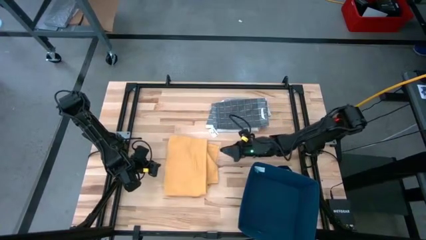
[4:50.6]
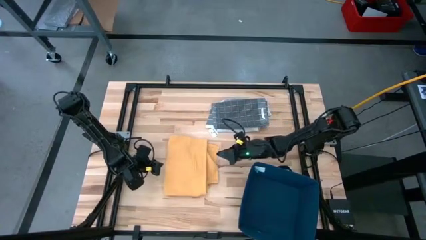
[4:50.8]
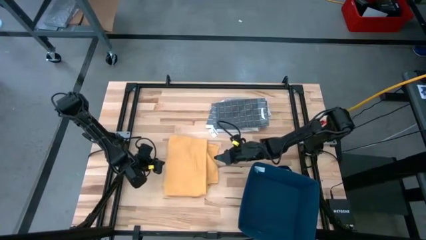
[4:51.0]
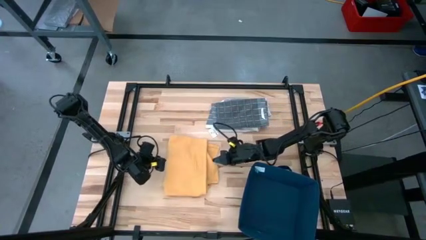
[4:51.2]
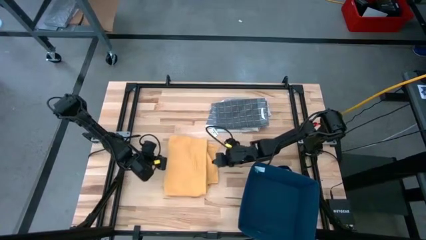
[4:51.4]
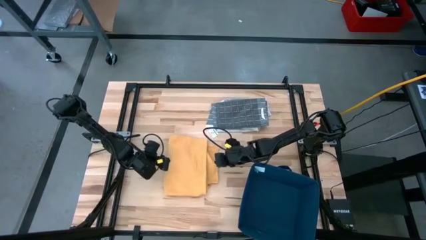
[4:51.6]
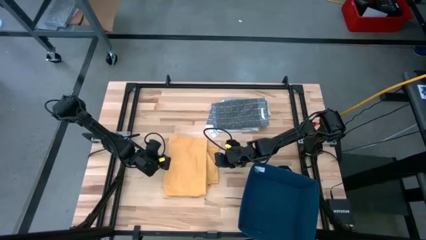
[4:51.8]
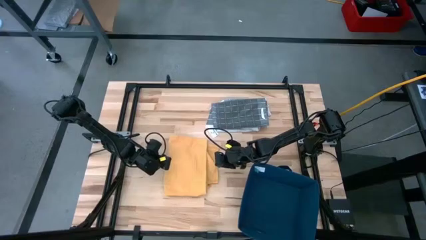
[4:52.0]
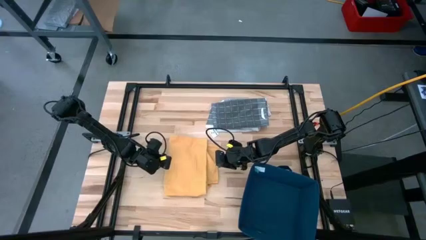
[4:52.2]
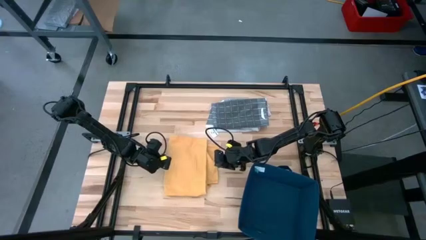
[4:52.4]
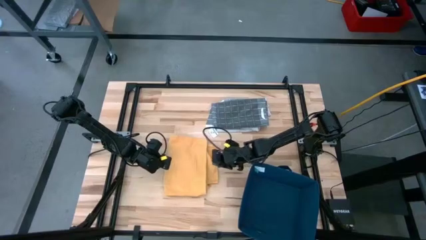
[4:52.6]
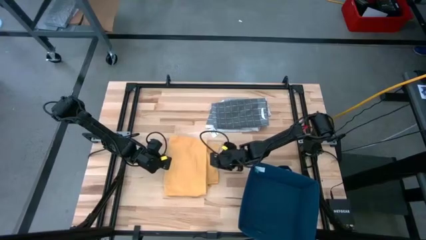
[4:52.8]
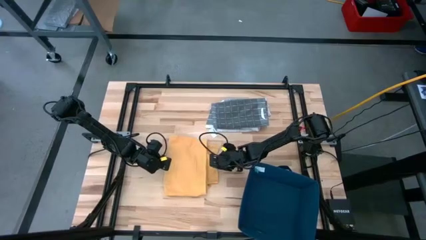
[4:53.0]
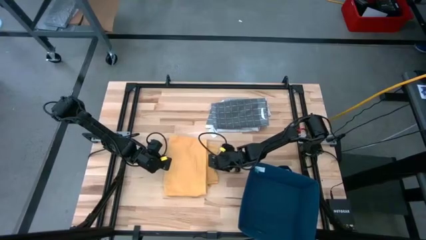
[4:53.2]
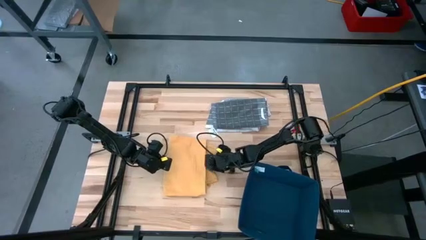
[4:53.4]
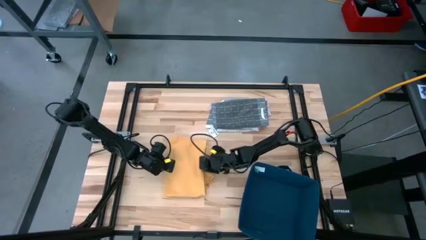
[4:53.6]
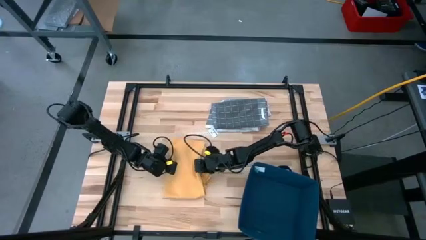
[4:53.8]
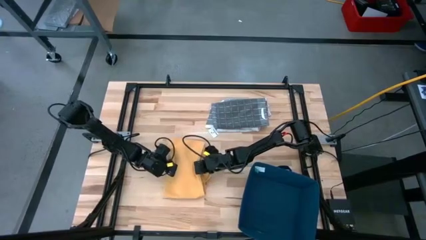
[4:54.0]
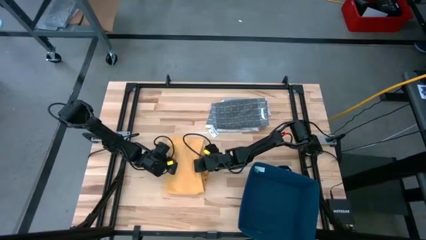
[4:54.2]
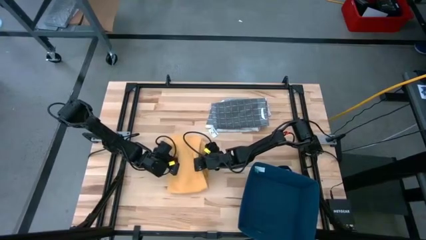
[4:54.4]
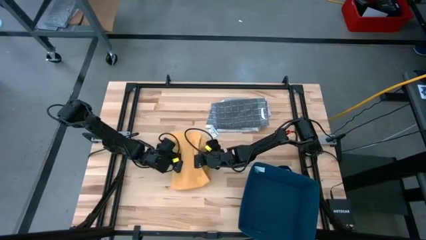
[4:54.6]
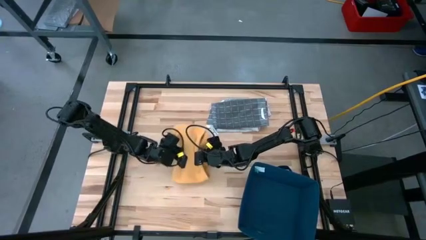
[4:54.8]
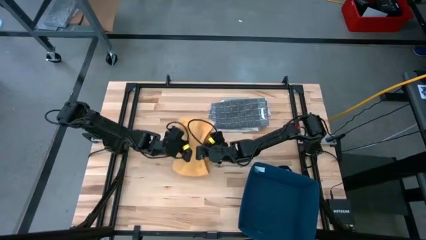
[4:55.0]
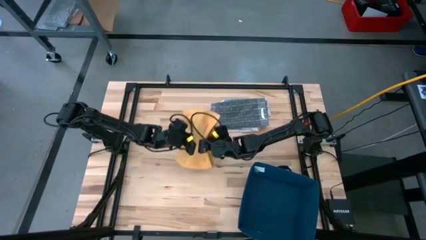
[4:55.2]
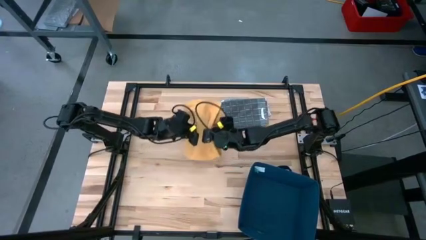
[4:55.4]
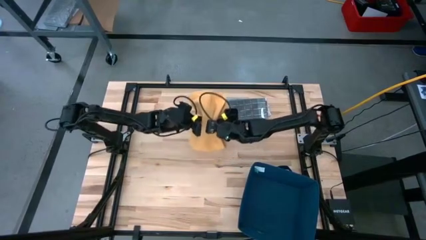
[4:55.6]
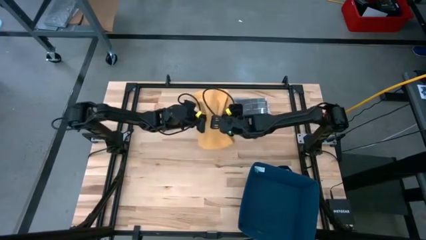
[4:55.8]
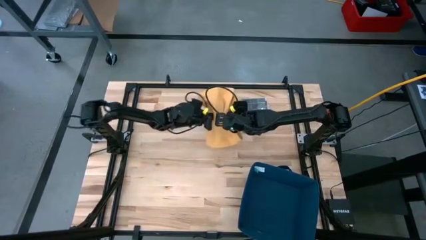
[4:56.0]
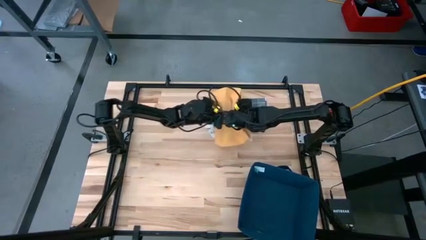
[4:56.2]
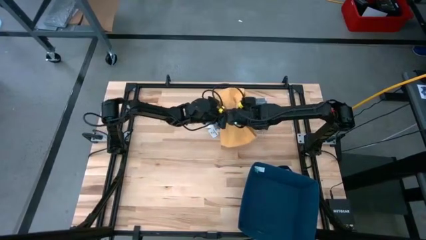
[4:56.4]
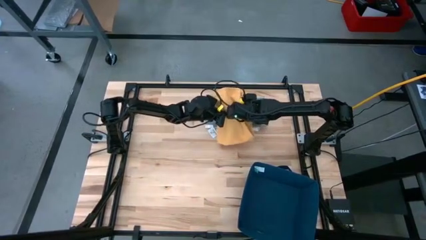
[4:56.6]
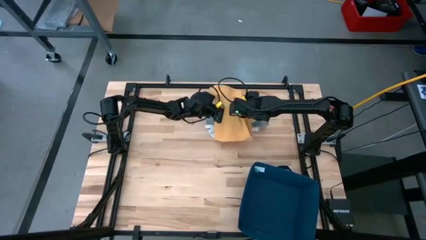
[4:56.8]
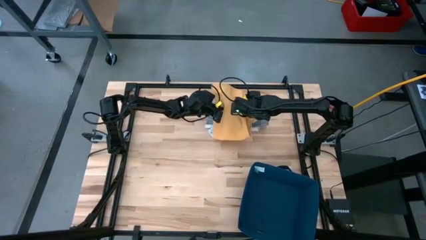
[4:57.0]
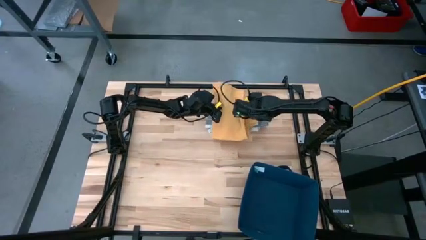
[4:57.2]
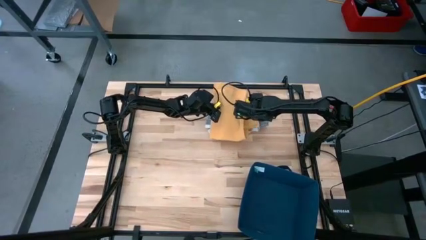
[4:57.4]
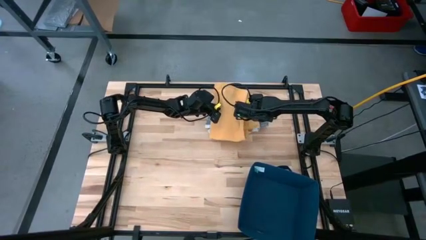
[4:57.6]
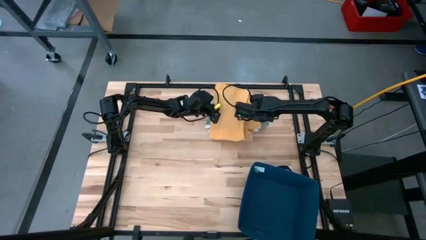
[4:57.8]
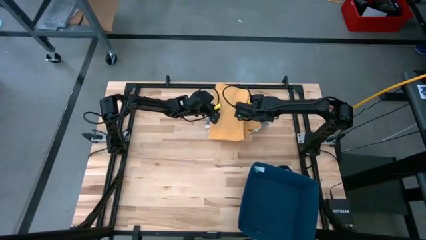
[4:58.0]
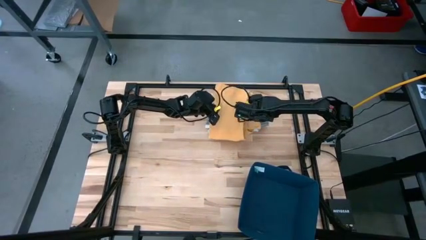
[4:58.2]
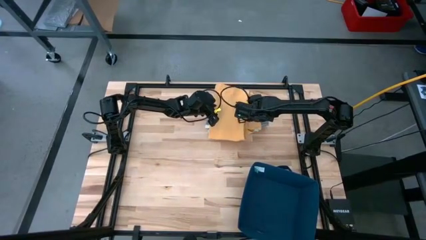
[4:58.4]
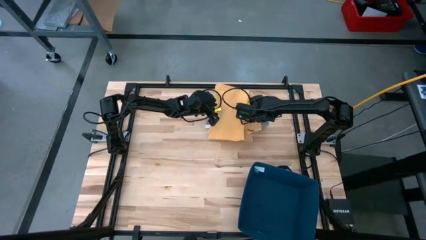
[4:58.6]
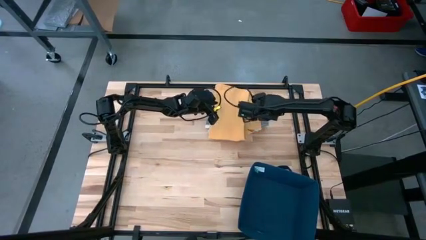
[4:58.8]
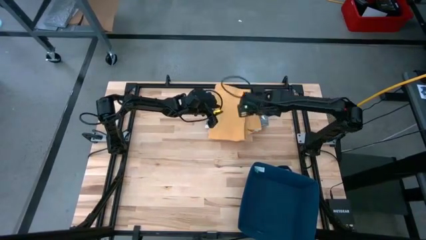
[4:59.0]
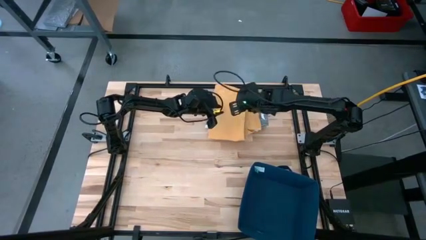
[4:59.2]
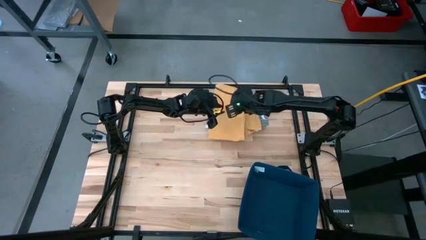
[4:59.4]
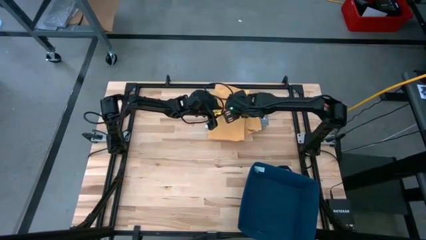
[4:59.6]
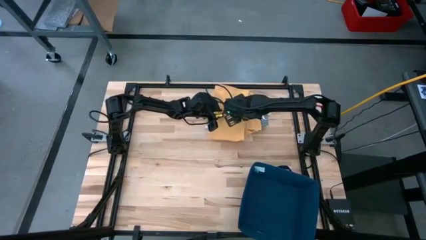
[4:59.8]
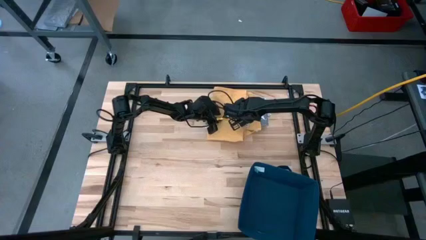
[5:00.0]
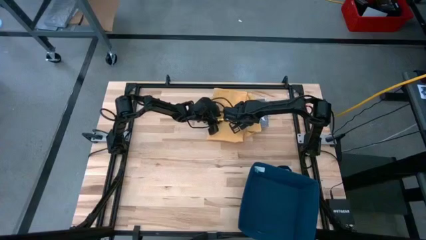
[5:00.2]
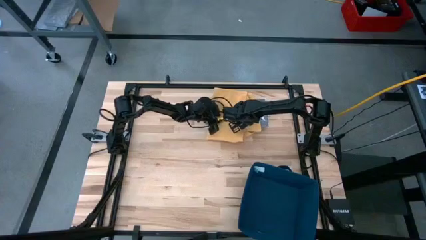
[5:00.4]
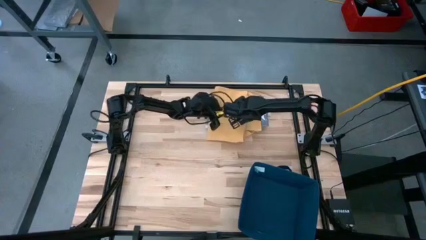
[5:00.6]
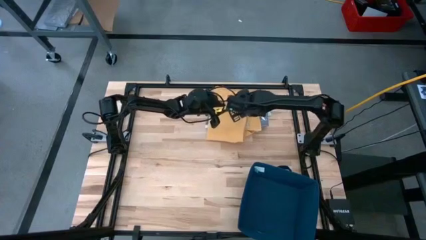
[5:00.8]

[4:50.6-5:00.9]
Task: Fold towel
Stack the yellow kitchen towel onto the gray kitchen towel

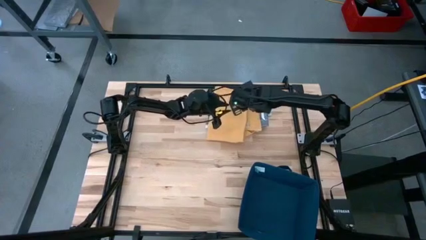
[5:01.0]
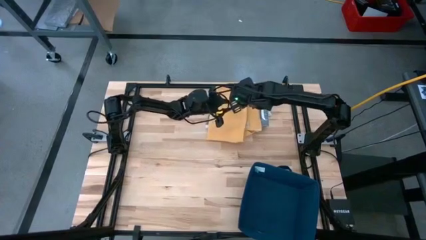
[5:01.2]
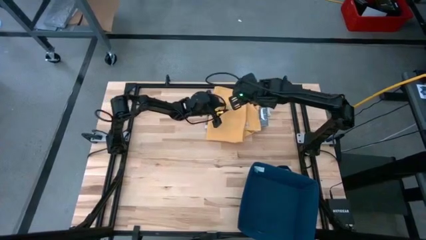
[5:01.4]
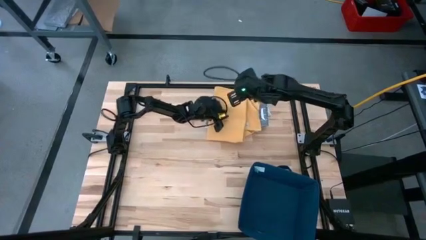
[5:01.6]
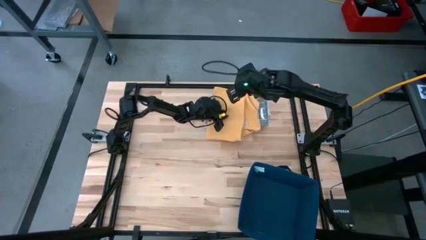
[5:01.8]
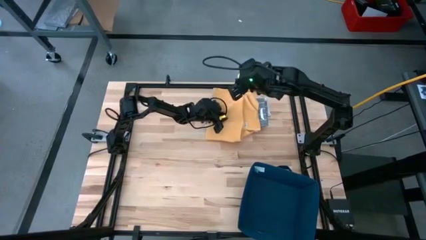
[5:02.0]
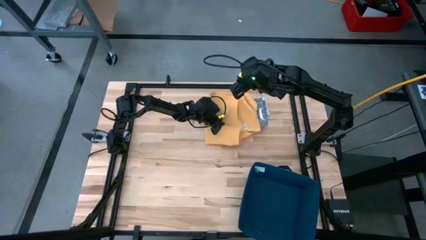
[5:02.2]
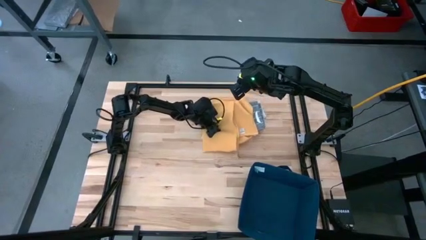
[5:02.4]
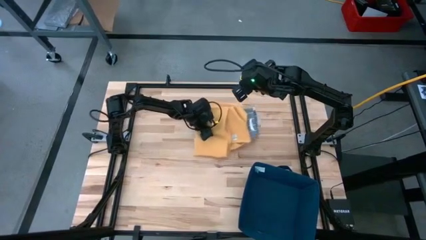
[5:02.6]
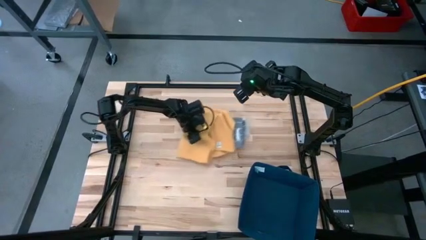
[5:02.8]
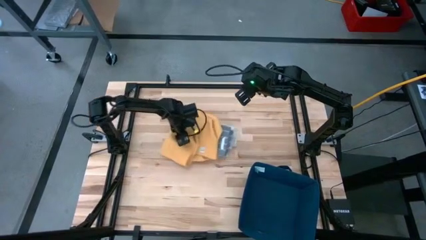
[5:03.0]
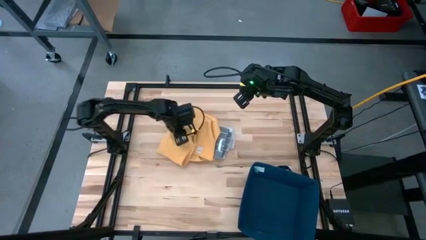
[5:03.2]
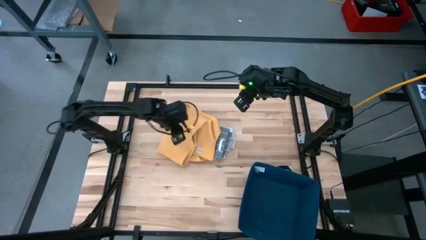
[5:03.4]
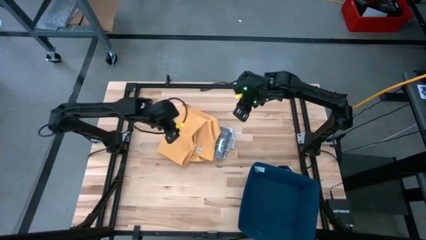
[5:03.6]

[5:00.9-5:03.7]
Move the kitchen towels to the center of the table
